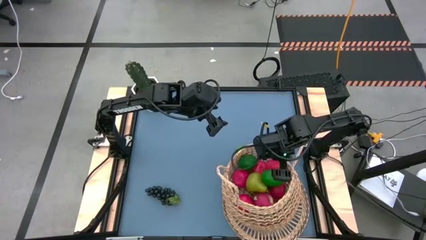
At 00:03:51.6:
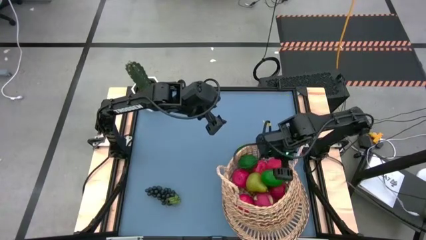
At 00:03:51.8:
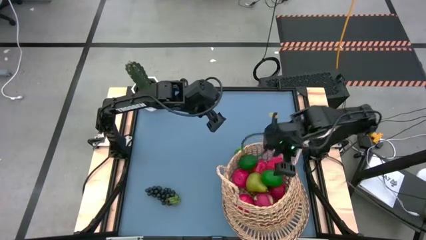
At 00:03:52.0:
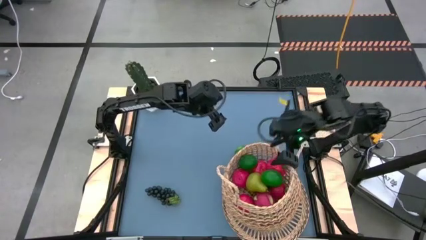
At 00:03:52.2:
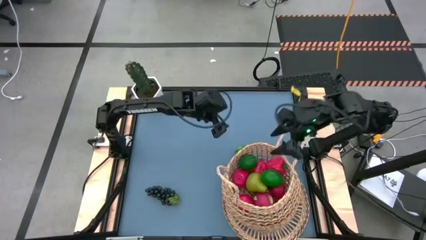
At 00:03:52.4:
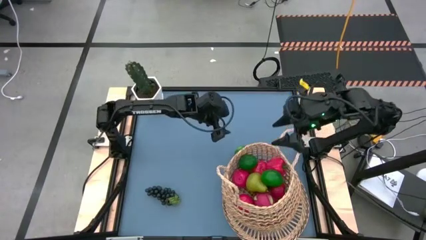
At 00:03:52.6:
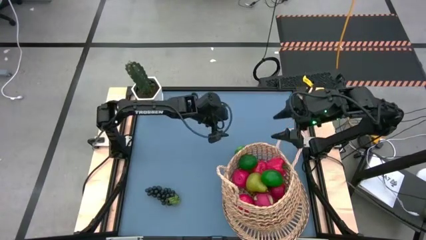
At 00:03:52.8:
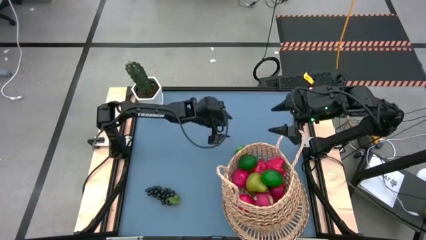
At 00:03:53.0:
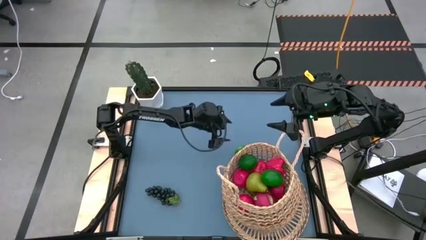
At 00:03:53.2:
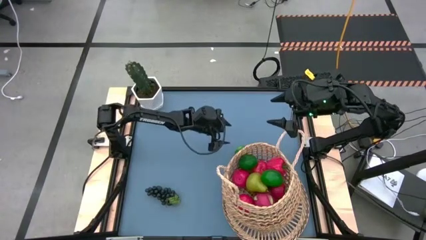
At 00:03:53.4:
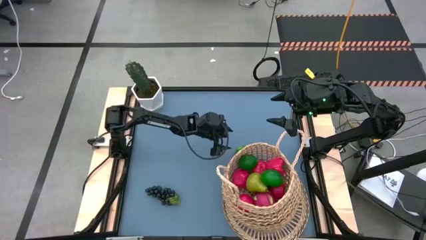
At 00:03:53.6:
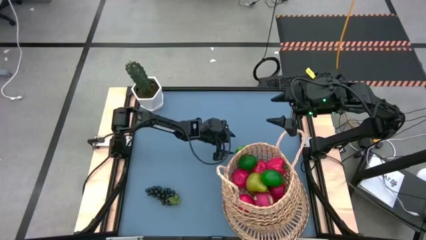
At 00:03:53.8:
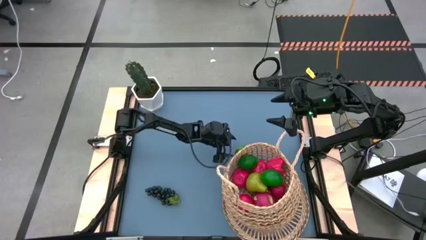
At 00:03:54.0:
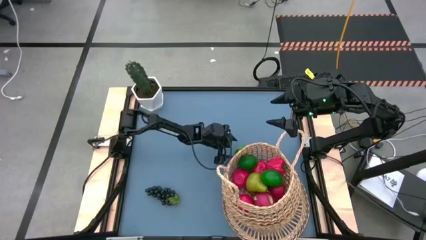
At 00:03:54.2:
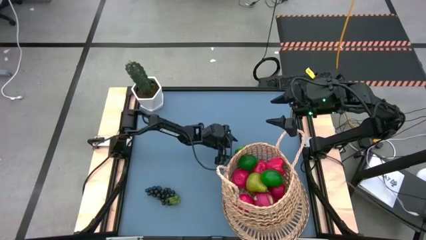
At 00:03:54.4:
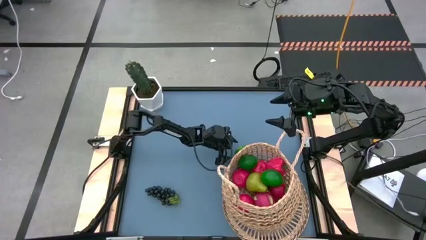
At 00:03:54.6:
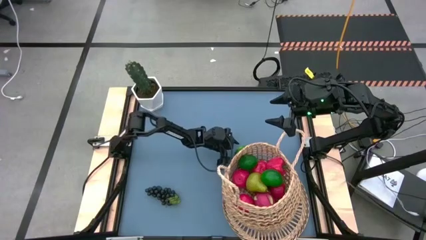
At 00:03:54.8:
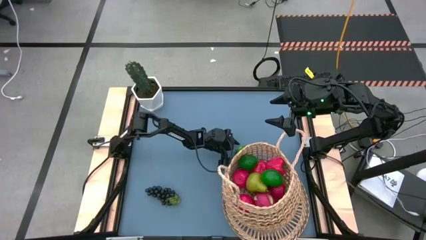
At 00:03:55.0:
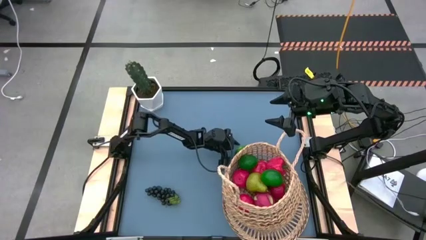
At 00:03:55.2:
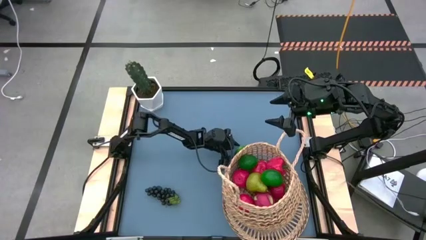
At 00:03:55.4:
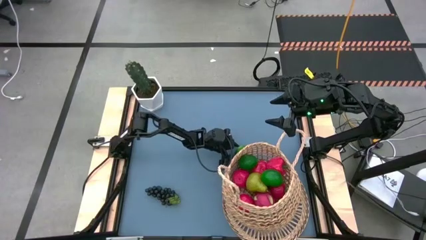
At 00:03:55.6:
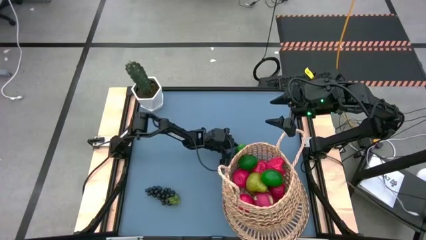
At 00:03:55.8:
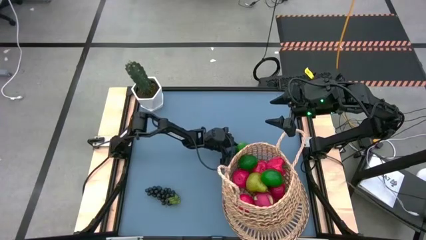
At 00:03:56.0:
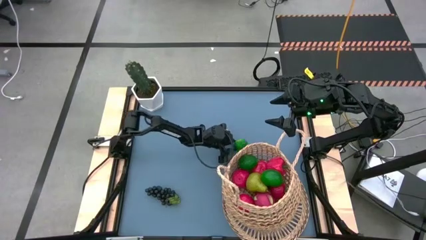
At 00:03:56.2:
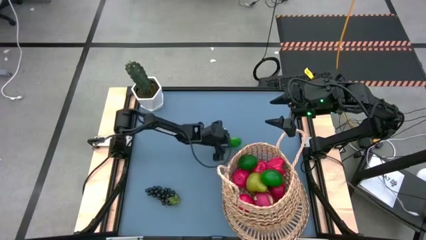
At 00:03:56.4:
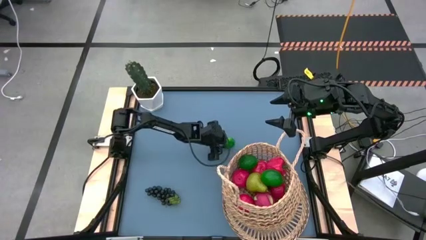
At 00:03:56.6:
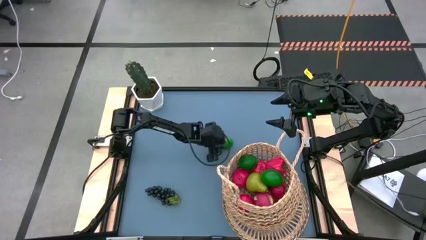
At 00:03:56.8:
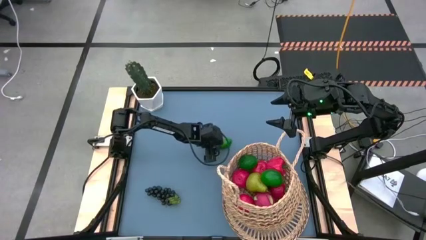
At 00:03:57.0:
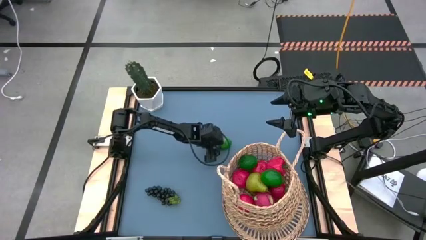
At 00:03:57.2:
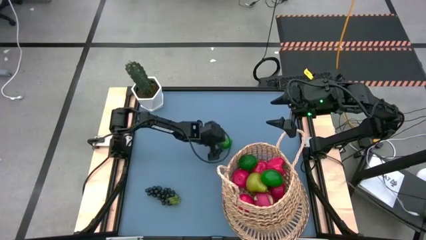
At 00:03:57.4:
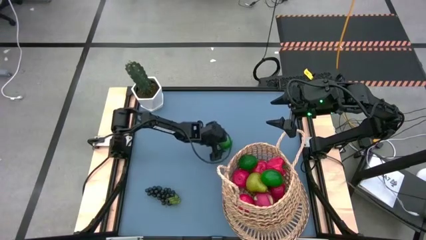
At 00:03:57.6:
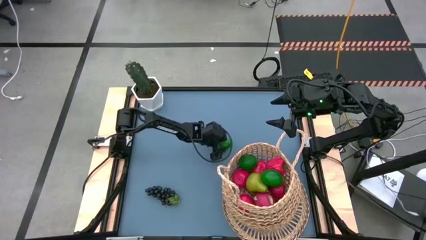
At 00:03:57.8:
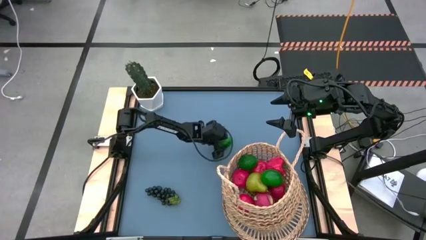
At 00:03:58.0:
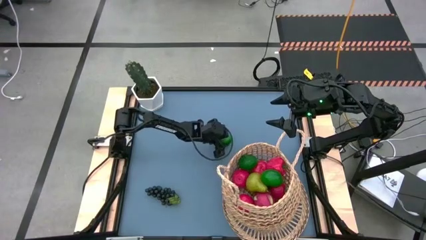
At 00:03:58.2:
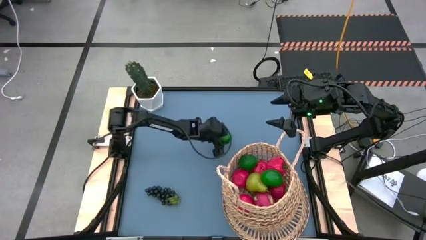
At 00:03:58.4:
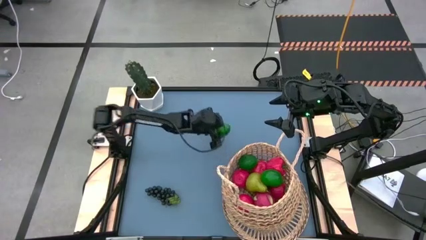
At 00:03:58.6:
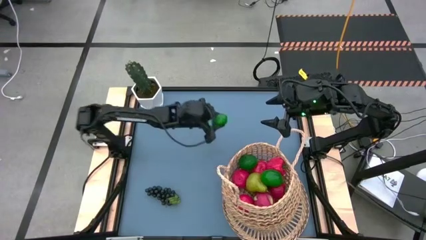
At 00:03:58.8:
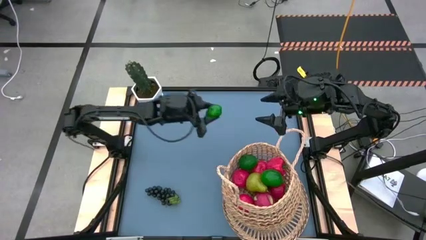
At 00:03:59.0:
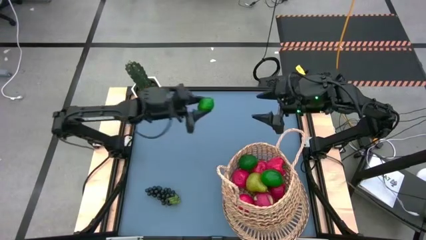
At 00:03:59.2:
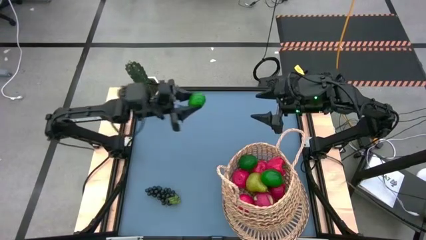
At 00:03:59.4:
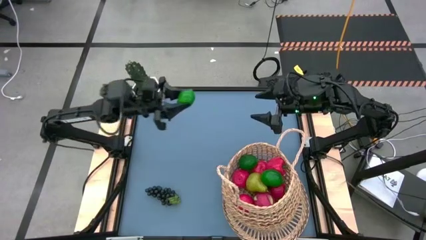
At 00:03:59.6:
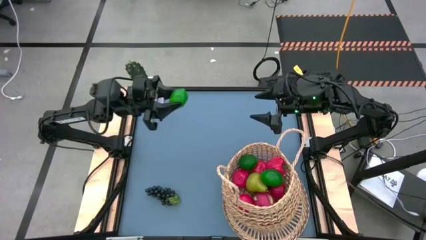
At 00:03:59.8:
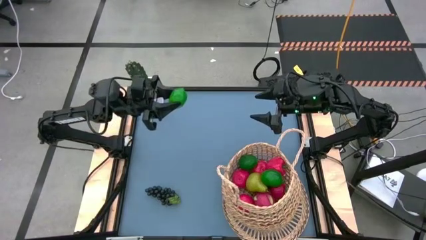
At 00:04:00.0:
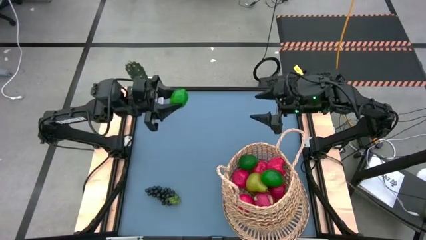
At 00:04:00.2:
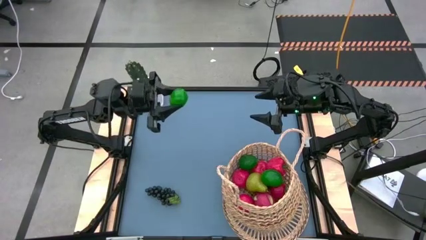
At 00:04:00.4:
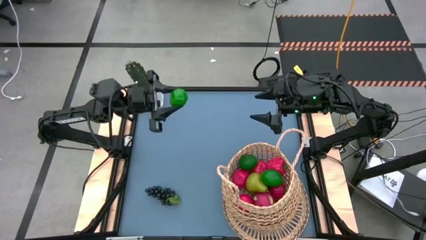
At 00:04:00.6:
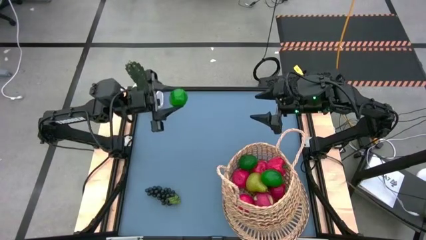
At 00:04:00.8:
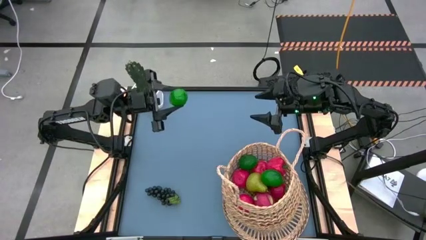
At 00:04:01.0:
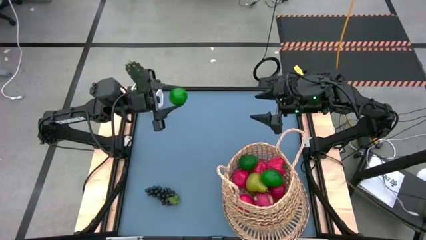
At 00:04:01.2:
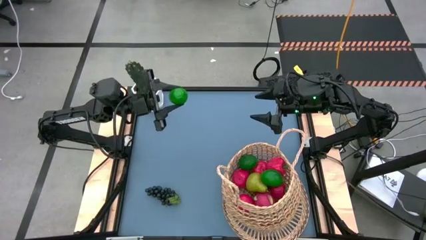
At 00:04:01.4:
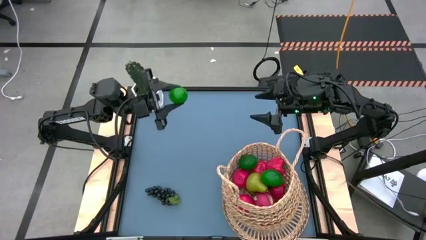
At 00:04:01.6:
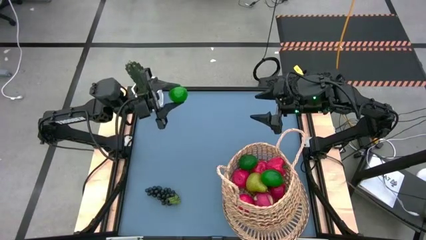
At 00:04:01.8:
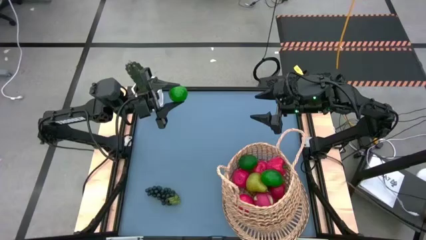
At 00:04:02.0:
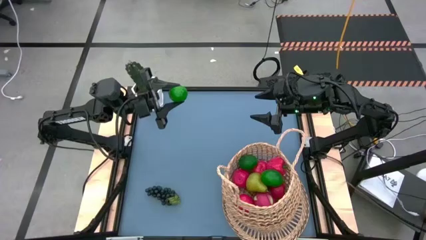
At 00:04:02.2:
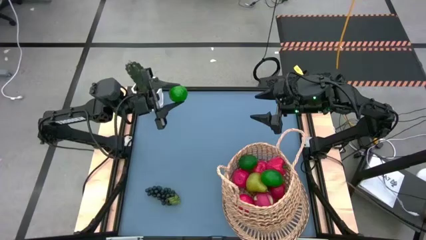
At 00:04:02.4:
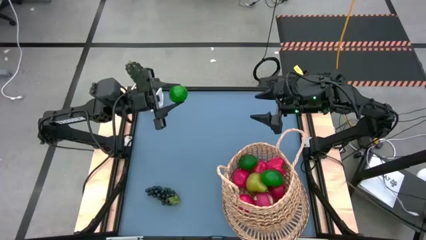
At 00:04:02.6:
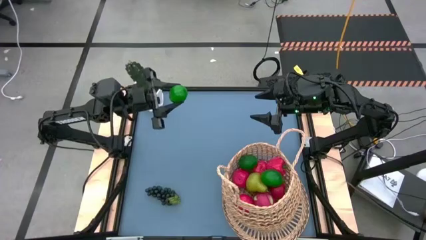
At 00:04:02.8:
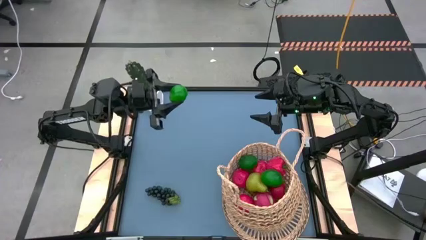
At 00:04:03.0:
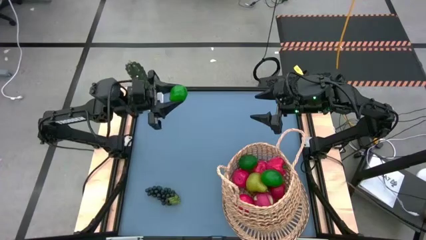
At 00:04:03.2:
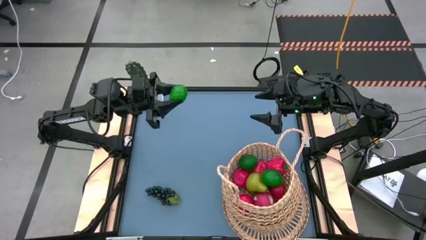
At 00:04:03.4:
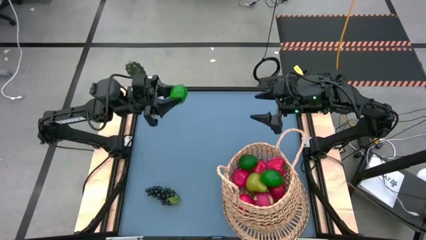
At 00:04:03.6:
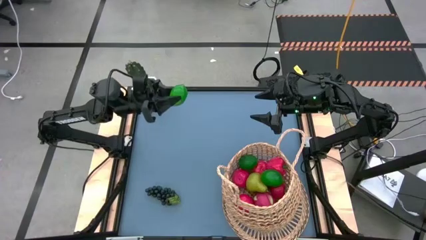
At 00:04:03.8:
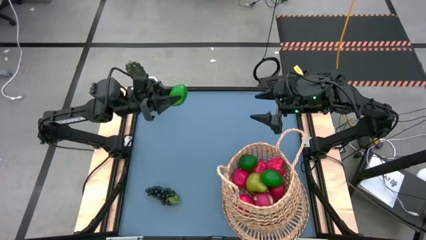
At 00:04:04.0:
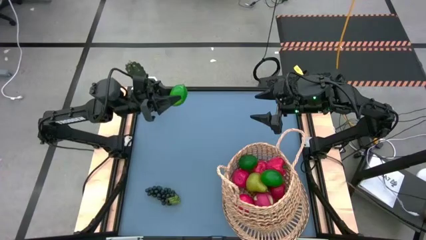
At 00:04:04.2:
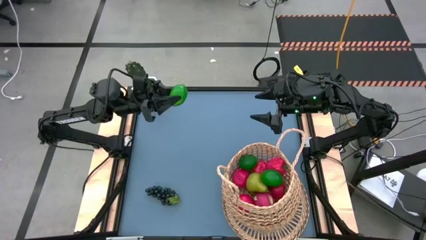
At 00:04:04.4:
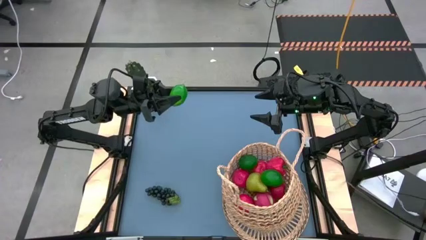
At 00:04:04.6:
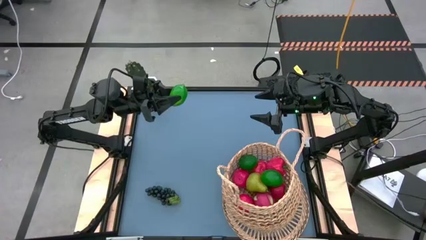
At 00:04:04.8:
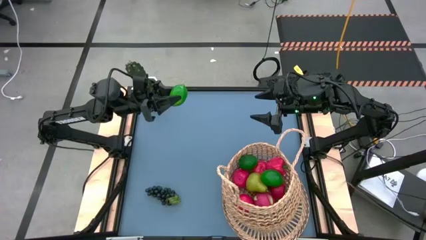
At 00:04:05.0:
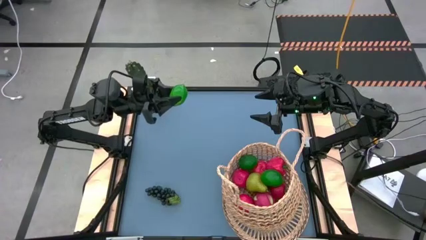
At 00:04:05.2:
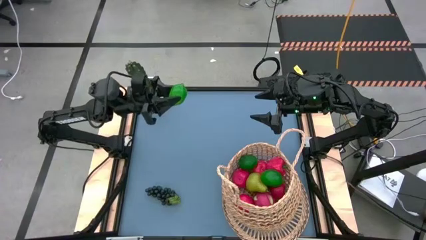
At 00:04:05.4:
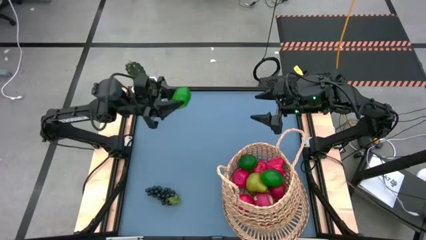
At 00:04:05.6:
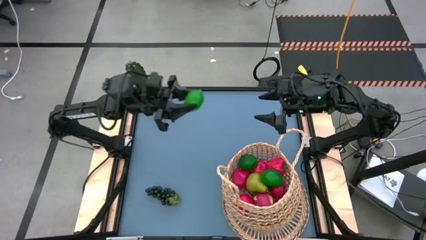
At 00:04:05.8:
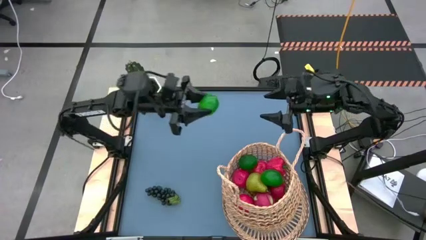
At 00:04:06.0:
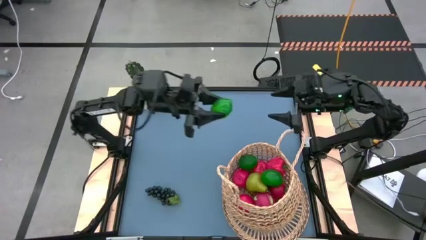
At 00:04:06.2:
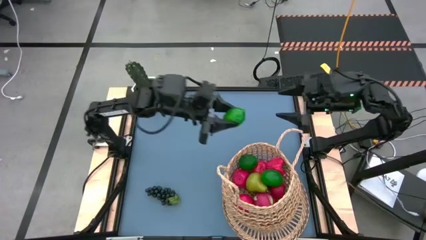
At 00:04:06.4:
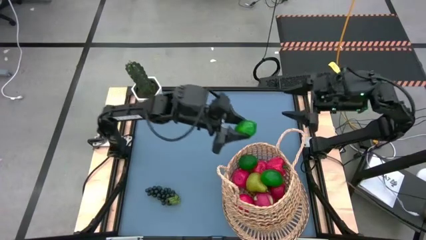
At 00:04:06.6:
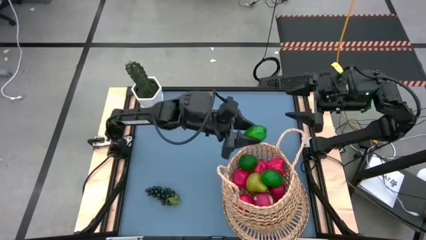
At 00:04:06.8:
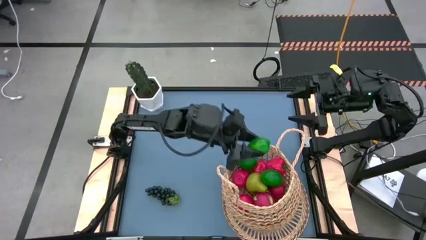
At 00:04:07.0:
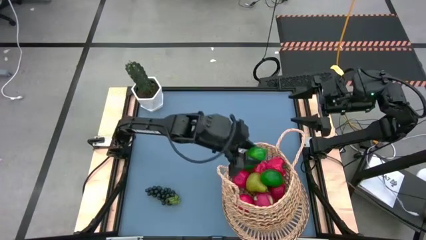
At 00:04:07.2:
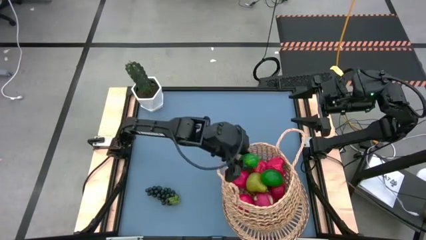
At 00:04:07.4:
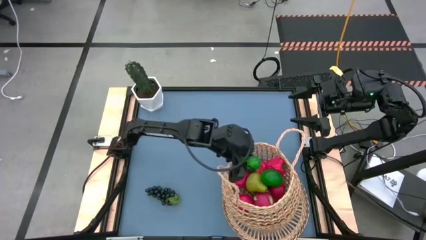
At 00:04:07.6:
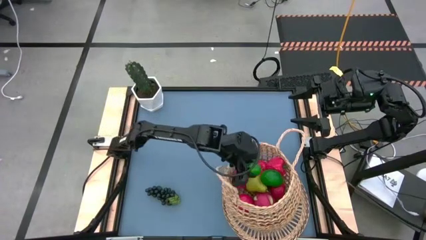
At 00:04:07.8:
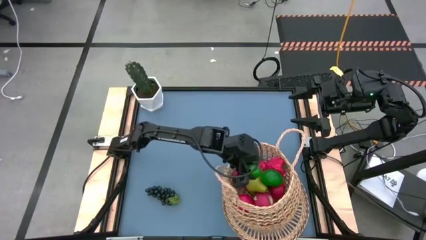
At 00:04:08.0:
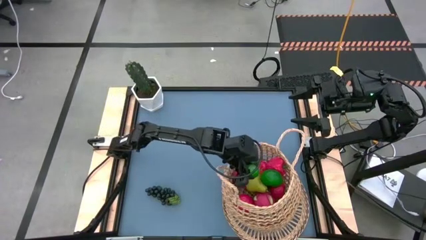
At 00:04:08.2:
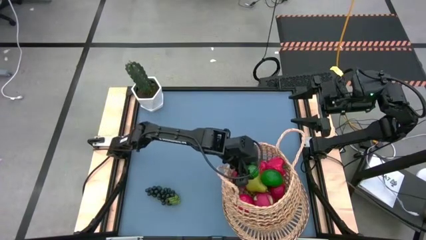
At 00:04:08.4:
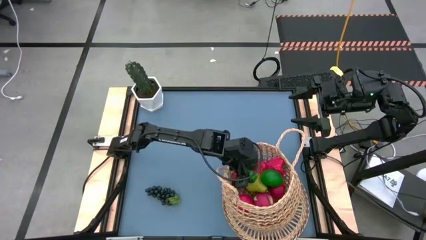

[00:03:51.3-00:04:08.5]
Task: Build produce basket
Put the green lime into the brown basket
